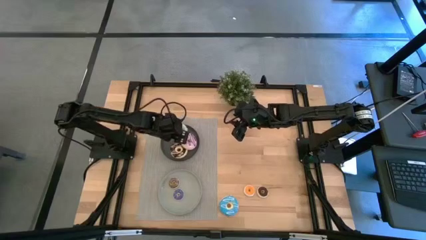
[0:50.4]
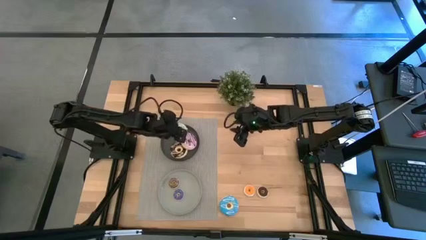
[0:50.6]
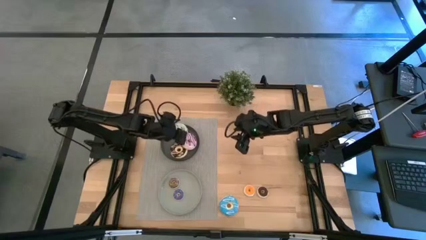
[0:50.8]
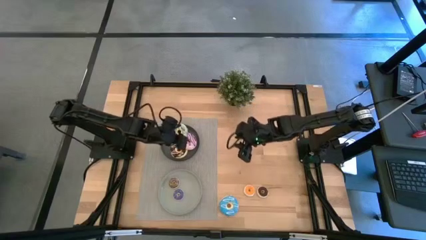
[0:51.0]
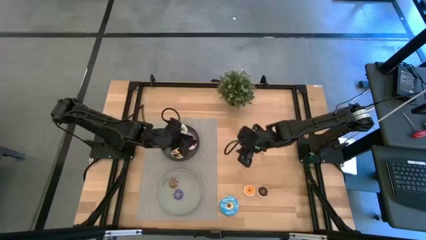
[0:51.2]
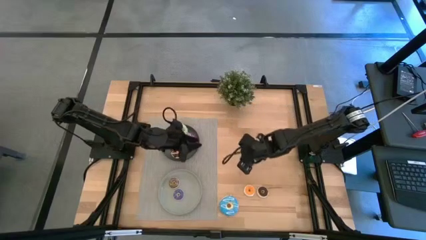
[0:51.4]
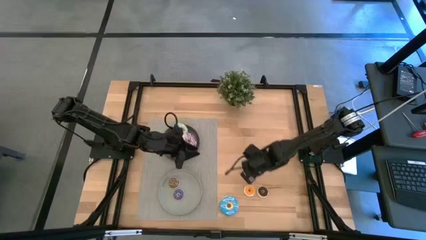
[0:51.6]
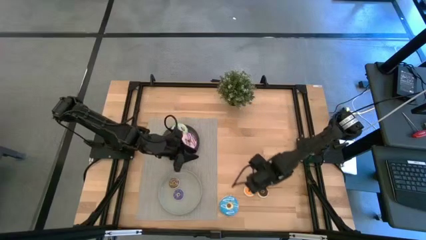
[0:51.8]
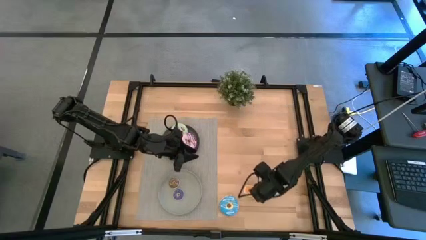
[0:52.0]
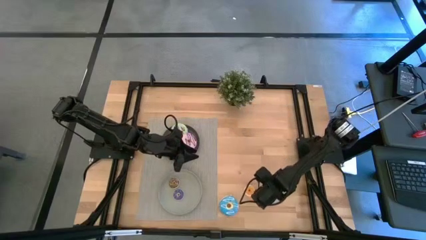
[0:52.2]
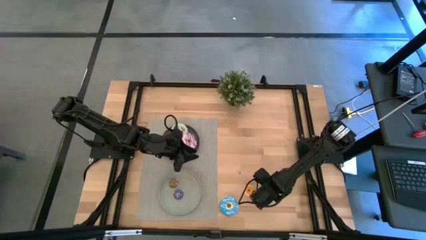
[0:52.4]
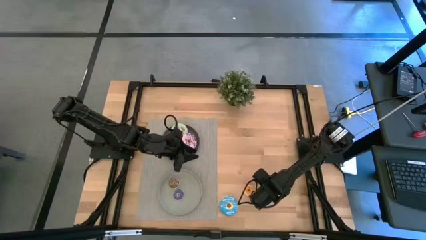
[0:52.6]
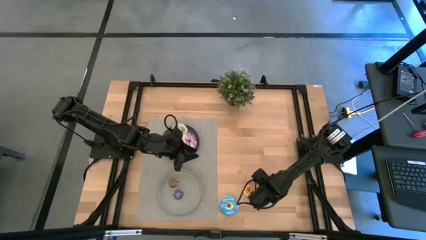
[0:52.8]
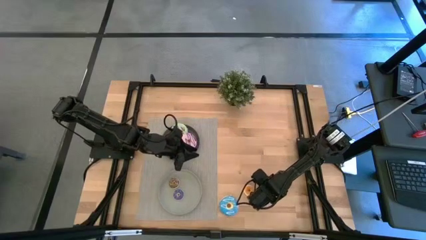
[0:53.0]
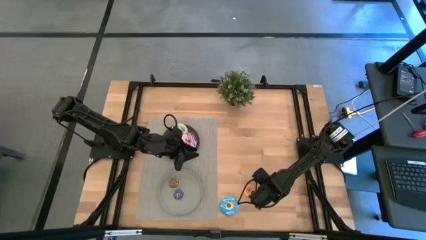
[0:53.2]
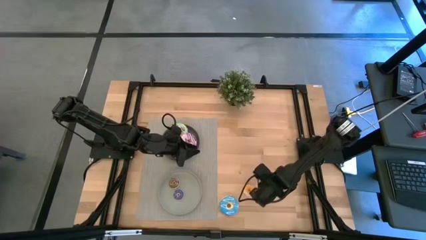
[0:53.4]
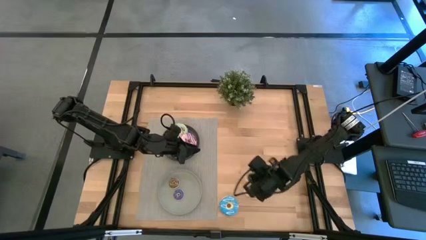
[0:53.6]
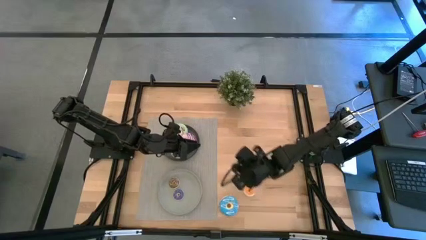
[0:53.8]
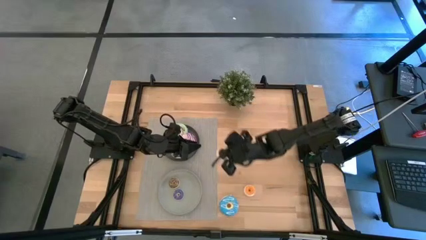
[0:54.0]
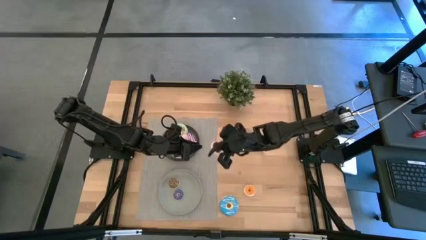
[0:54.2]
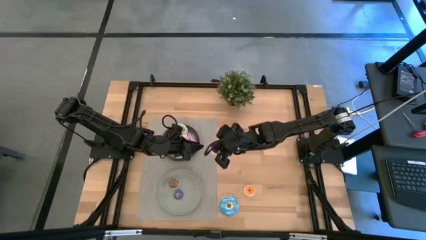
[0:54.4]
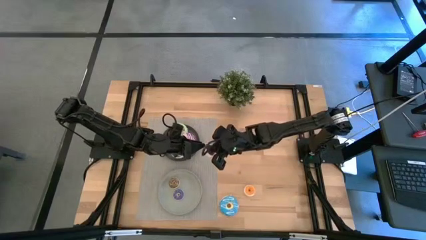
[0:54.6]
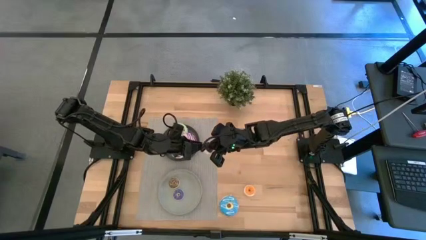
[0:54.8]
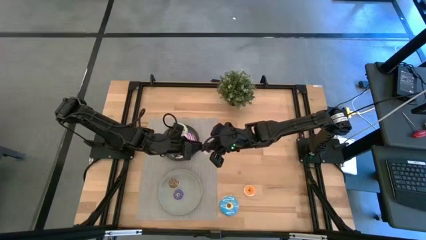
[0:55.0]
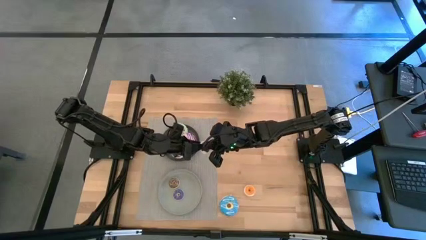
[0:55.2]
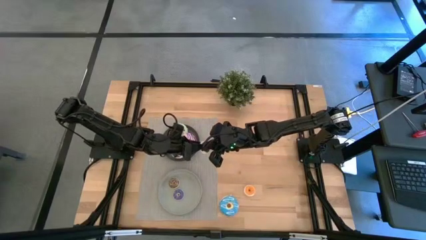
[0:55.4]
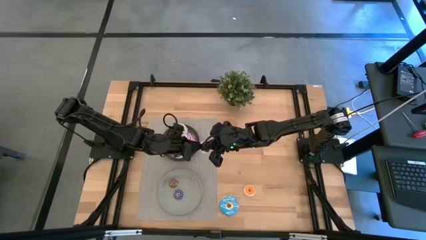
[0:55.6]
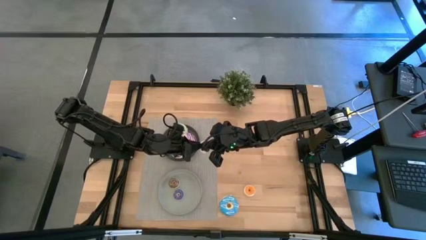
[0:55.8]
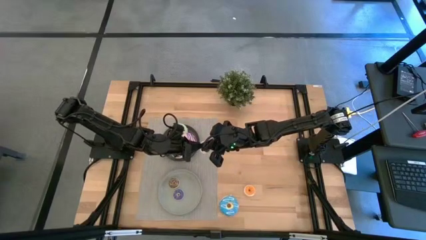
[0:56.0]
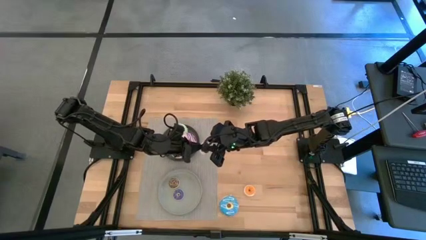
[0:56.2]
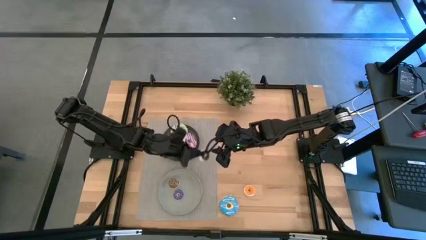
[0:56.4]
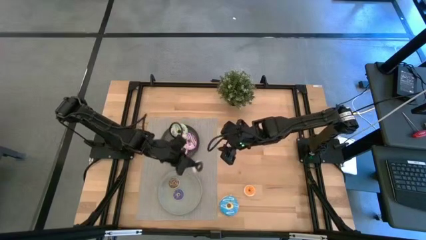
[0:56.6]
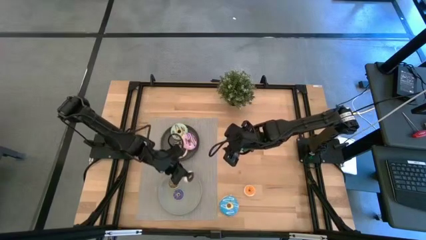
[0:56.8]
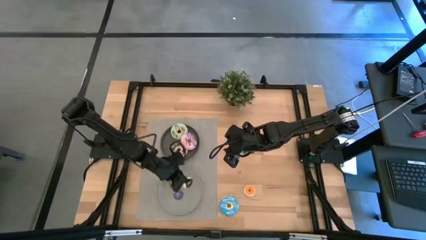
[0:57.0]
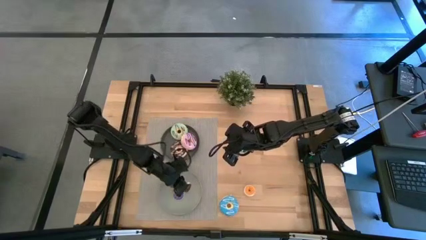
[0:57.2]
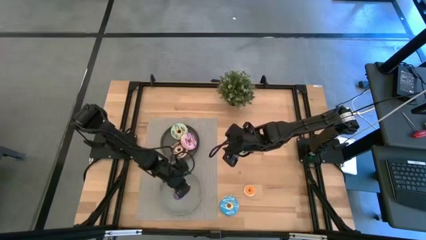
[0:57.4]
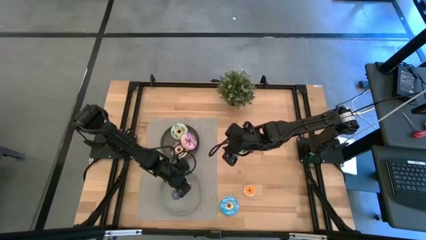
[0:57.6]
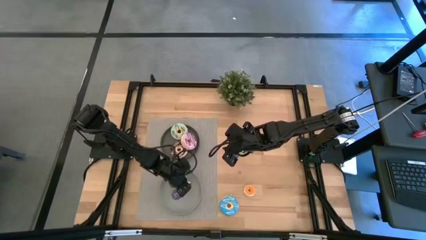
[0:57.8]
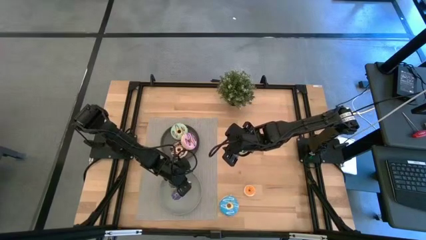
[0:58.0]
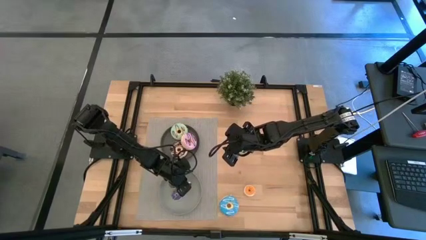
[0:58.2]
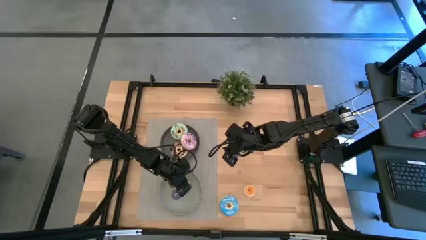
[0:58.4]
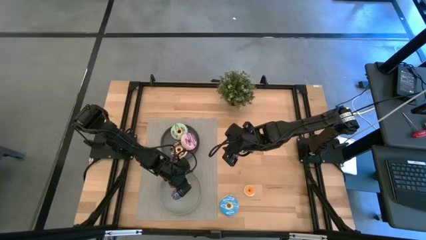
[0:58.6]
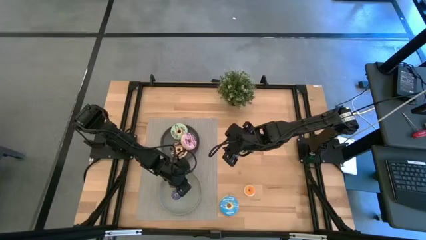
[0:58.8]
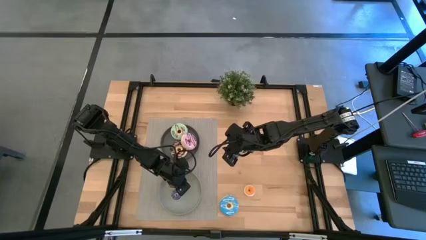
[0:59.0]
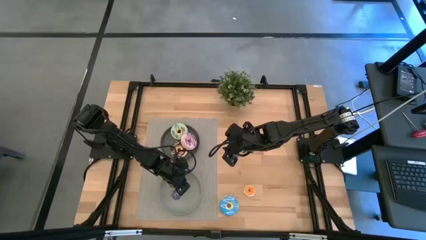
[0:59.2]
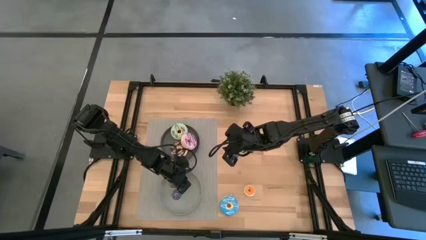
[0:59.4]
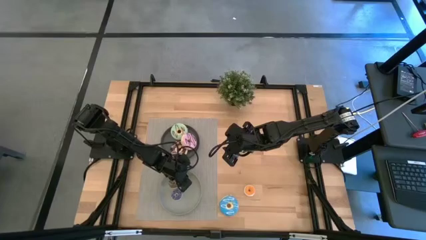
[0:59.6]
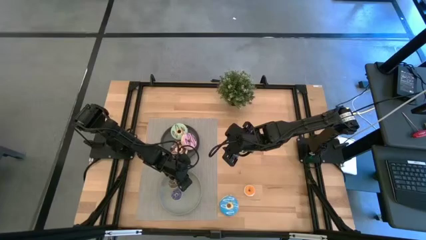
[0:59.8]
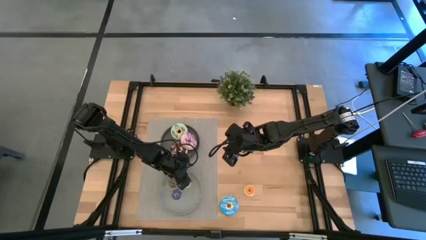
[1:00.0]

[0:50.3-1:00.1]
Task: Pick & Place donuts
Put the small white and brown donut on the gray plate

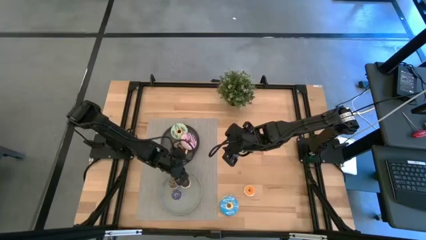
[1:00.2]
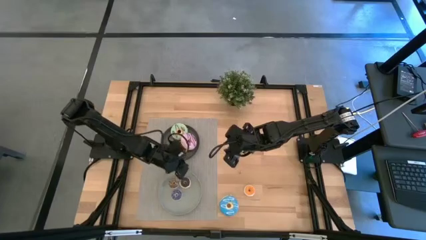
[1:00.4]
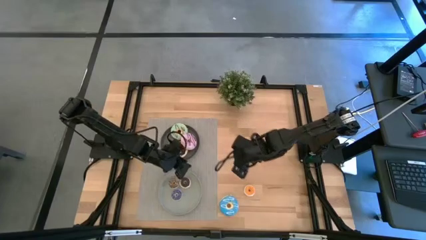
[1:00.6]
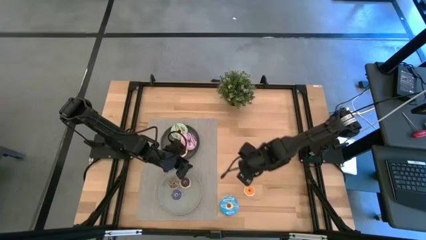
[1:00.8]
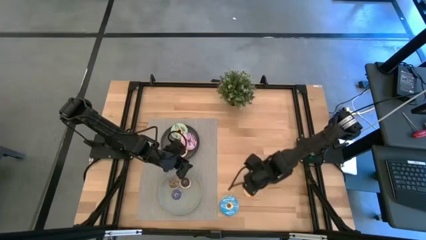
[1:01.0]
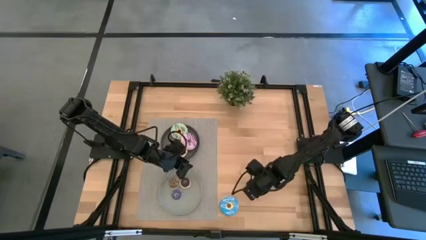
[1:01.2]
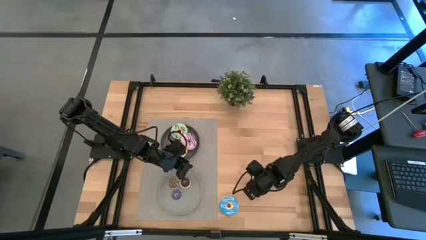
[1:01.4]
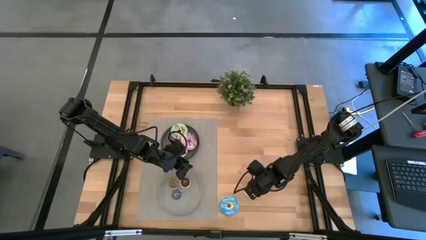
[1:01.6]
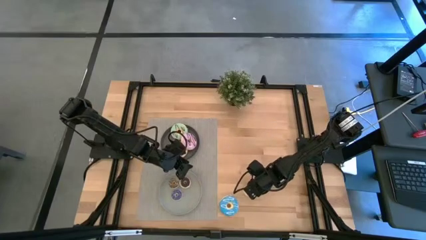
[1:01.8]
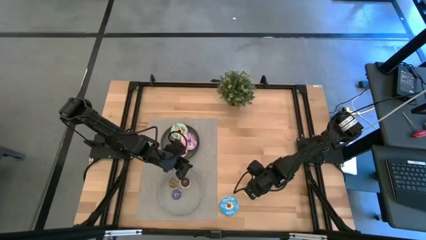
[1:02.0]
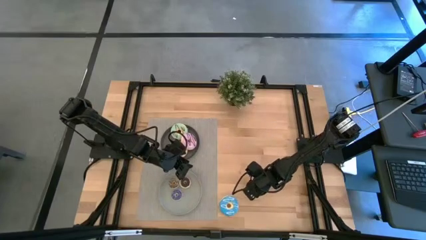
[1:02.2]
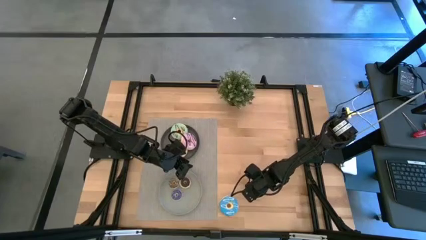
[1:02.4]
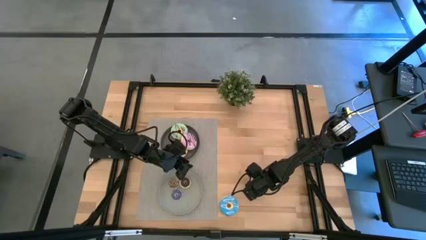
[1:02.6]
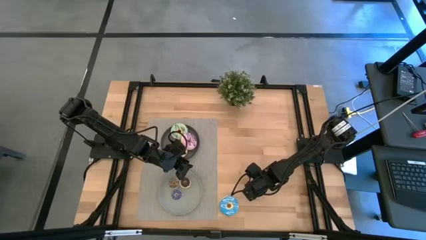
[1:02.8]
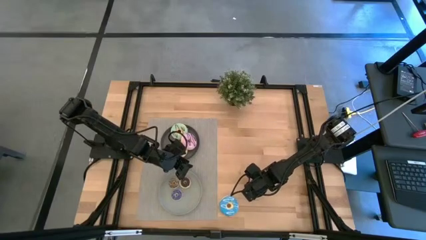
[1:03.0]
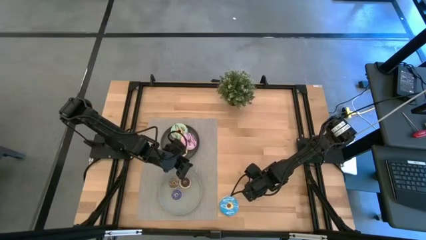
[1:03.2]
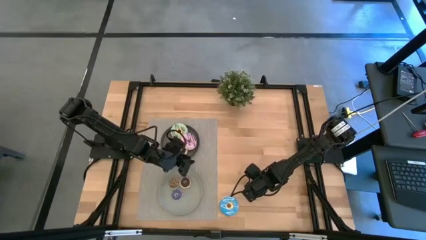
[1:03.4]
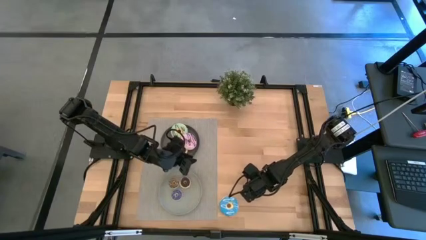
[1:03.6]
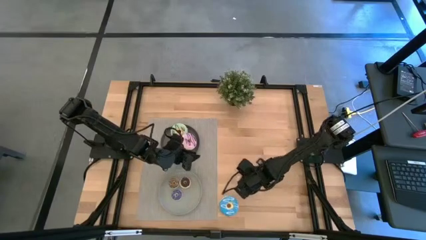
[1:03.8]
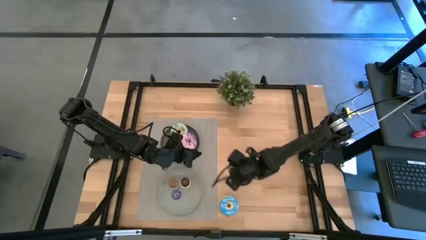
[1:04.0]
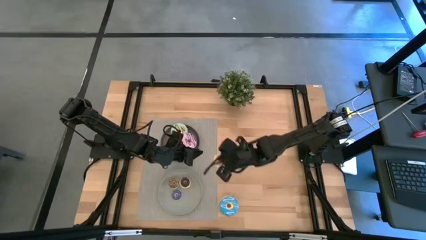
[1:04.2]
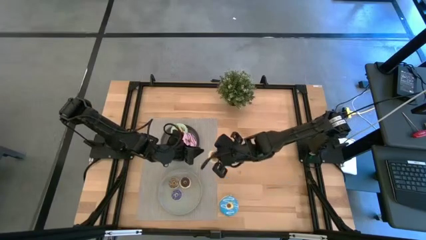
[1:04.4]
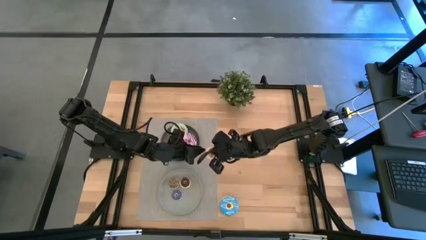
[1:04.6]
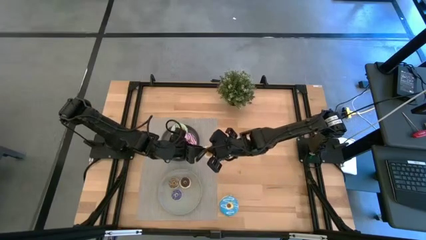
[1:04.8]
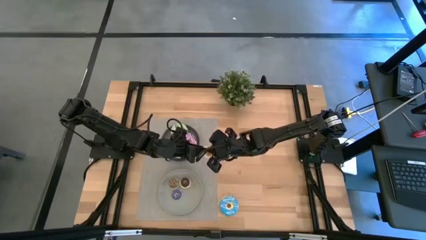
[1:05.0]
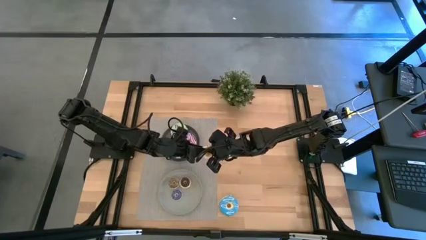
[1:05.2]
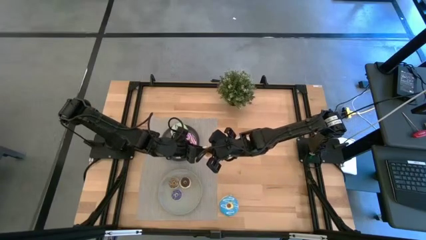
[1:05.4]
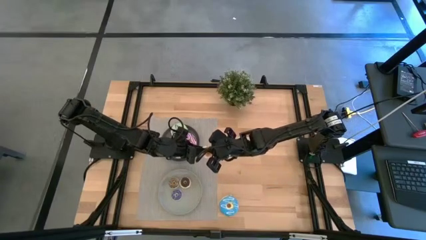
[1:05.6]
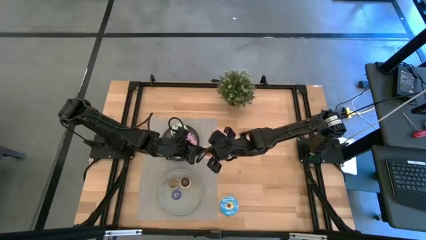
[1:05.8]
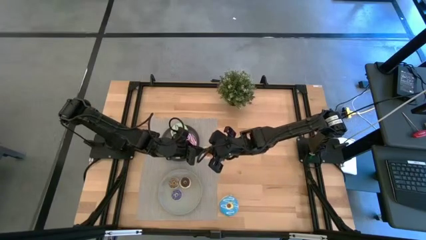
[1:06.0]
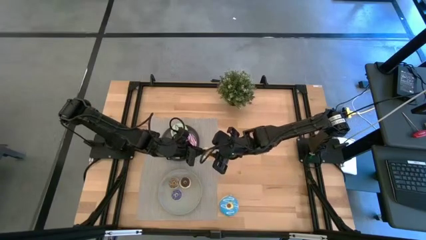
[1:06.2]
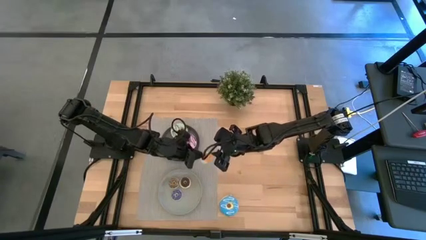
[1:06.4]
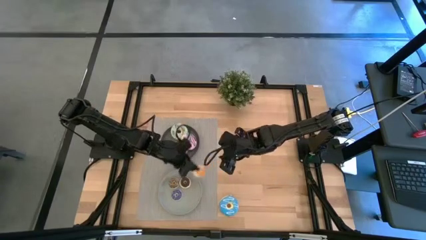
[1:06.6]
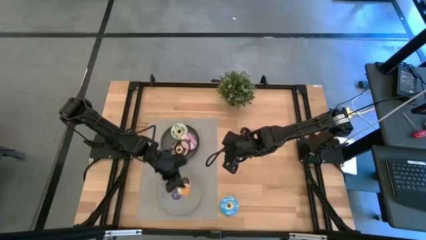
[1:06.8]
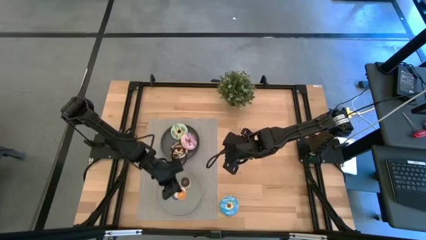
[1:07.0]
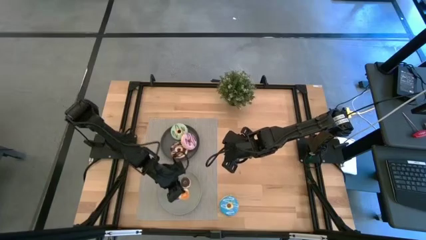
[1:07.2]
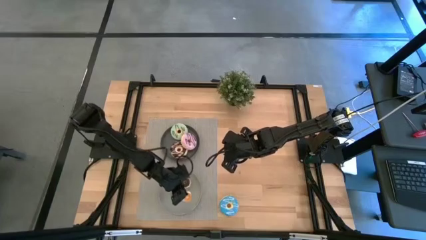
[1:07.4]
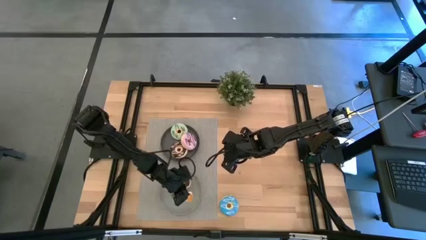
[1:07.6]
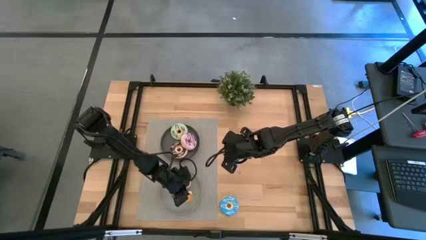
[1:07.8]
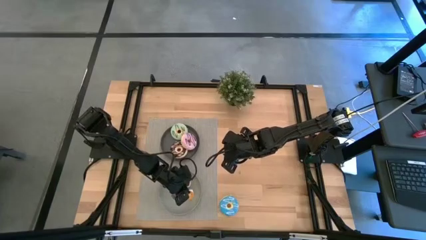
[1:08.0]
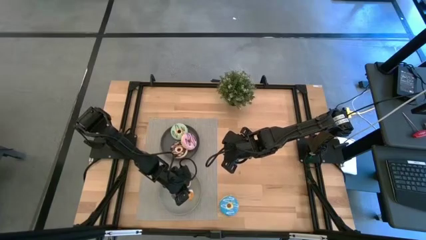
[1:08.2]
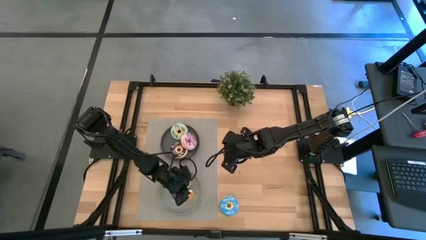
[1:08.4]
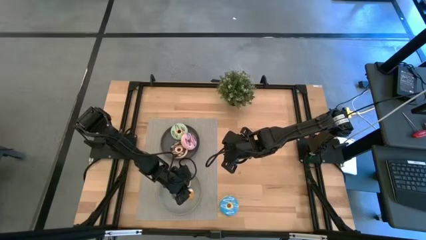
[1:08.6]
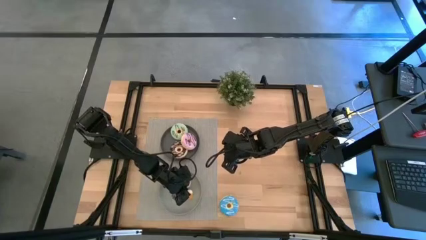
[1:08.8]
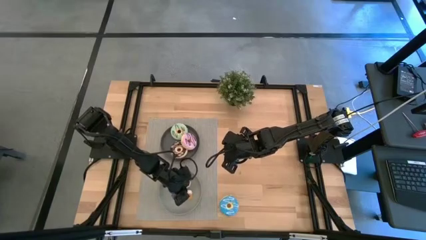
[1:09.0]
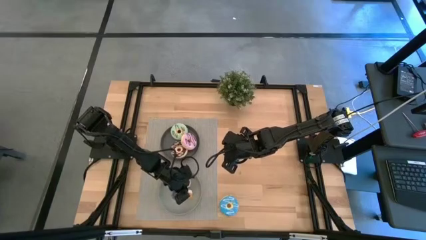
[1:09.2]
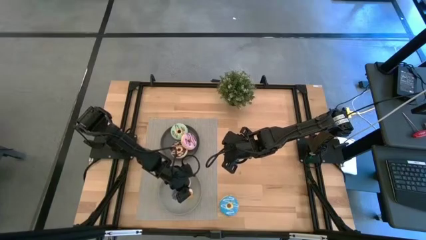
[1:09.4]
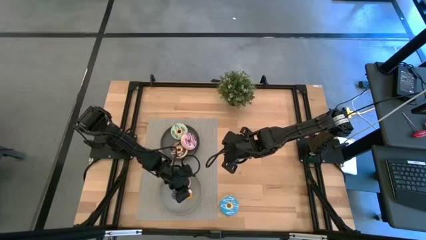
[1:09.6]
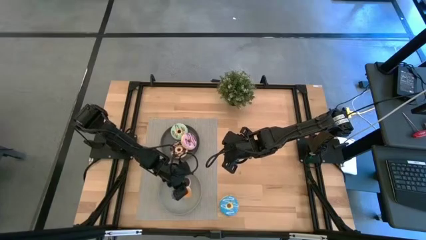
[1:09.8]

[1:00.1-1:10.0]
Put the small yellow donut on the gray plate
